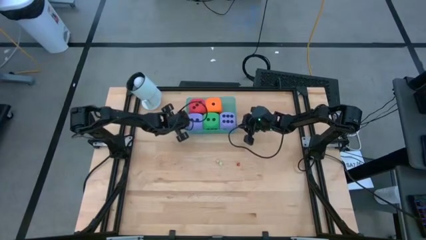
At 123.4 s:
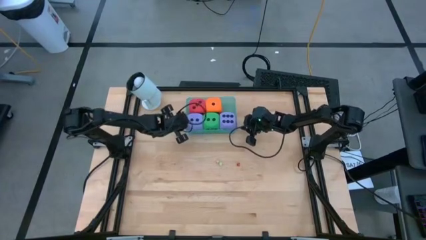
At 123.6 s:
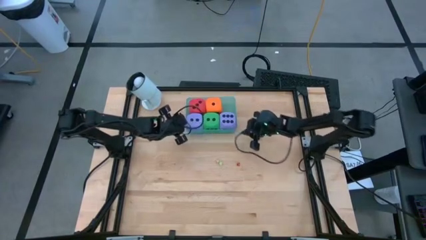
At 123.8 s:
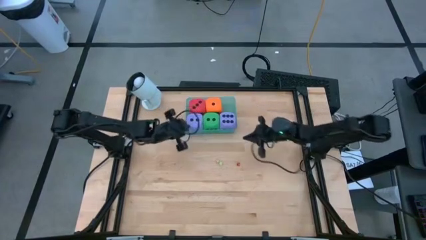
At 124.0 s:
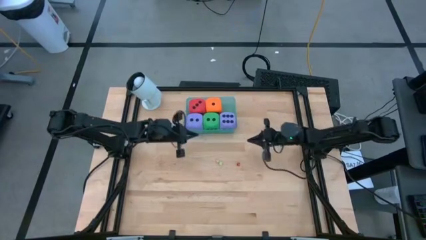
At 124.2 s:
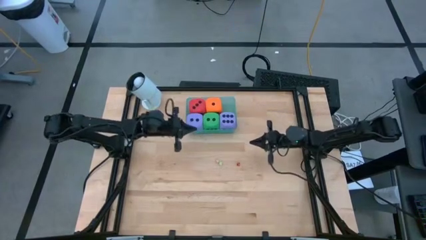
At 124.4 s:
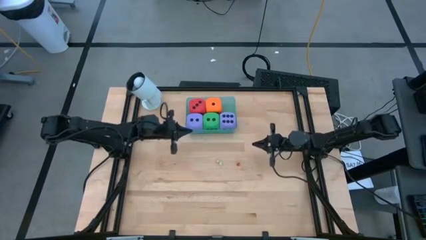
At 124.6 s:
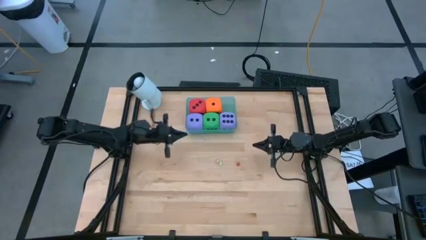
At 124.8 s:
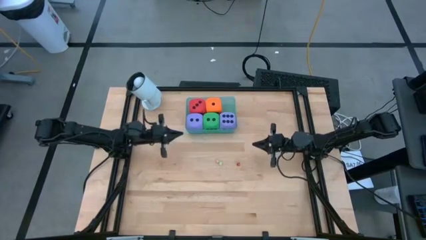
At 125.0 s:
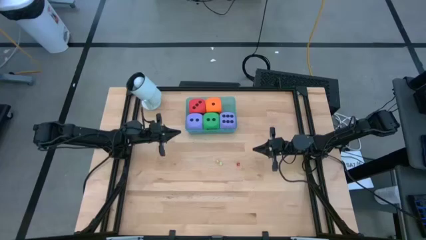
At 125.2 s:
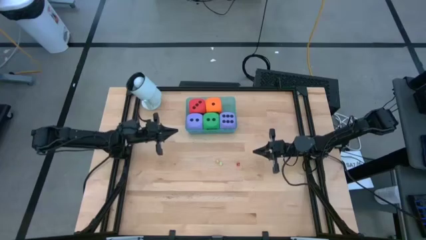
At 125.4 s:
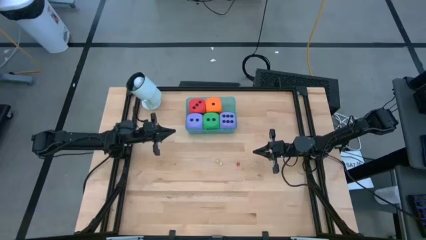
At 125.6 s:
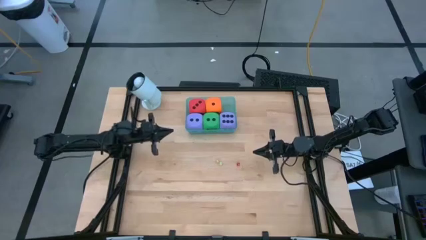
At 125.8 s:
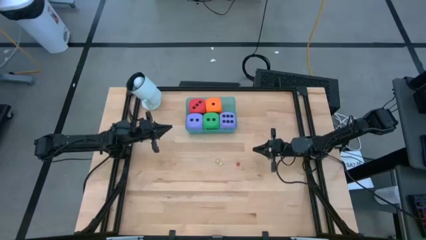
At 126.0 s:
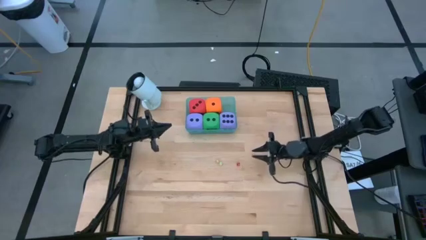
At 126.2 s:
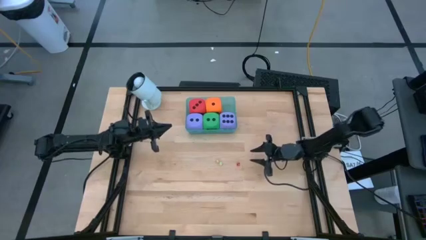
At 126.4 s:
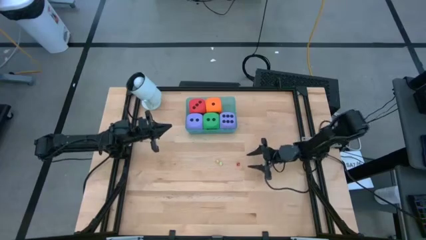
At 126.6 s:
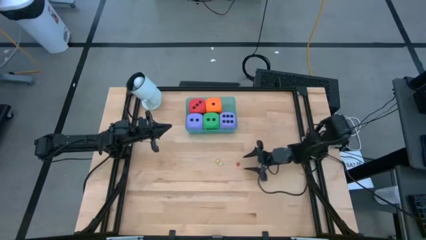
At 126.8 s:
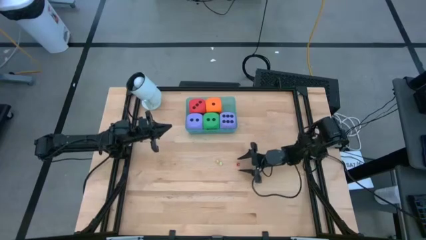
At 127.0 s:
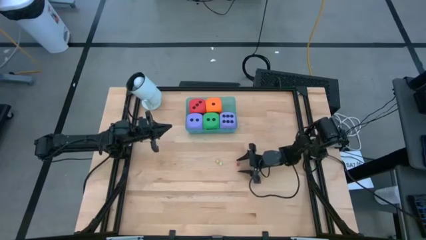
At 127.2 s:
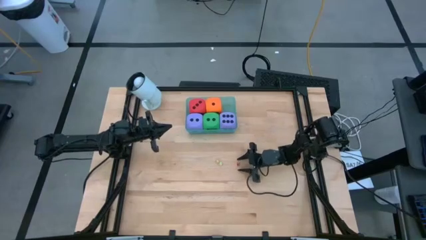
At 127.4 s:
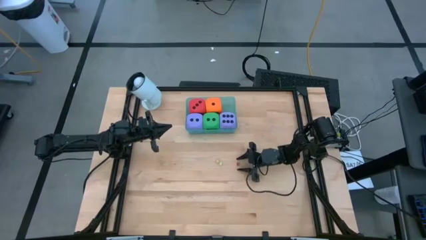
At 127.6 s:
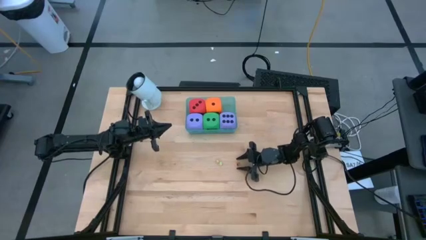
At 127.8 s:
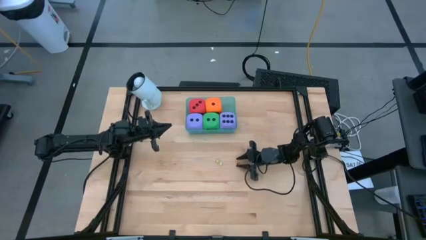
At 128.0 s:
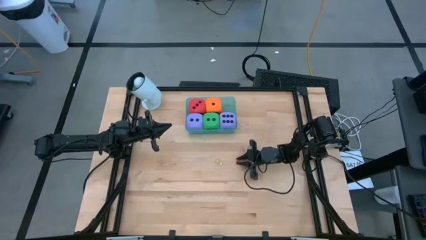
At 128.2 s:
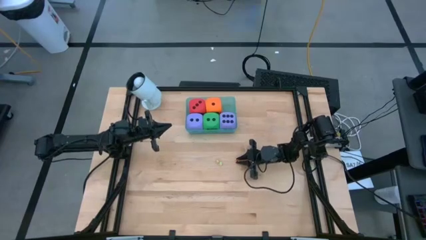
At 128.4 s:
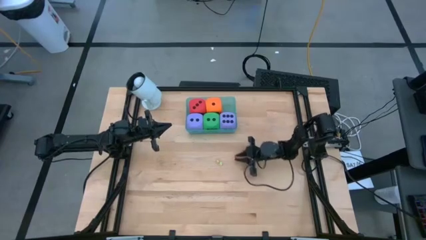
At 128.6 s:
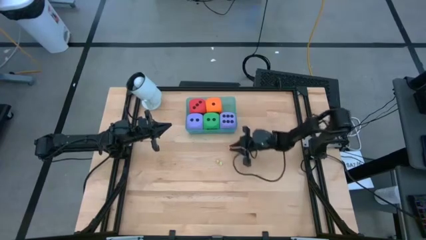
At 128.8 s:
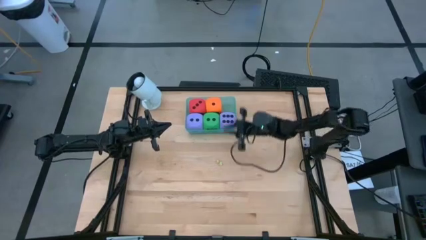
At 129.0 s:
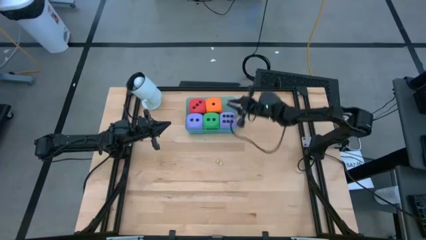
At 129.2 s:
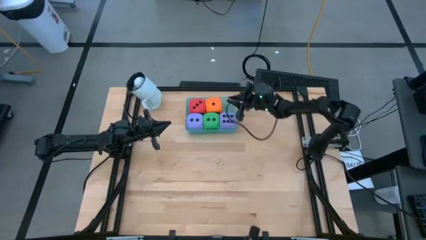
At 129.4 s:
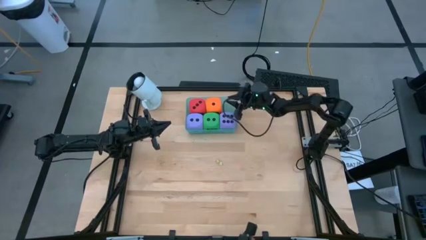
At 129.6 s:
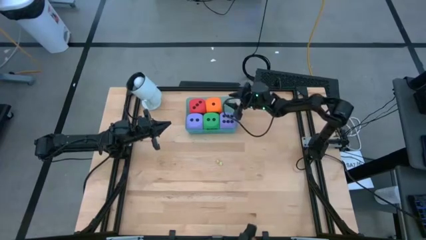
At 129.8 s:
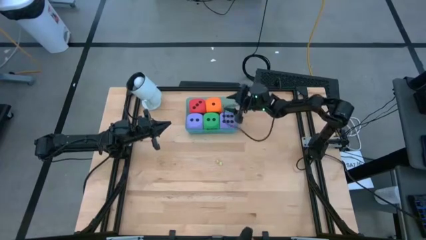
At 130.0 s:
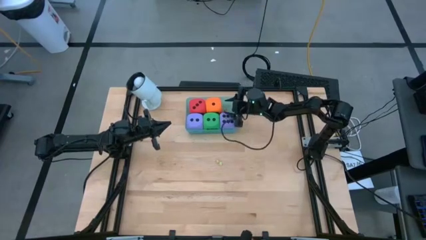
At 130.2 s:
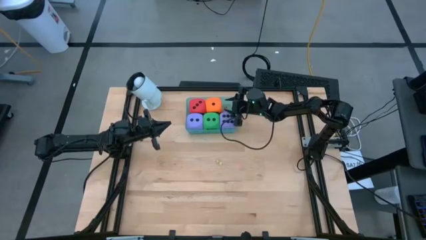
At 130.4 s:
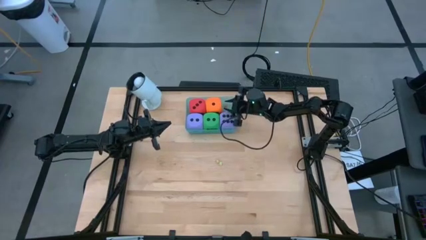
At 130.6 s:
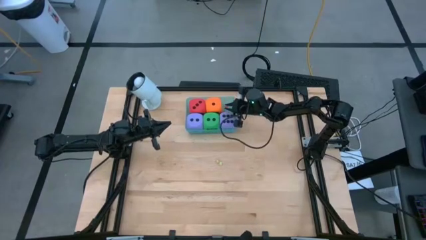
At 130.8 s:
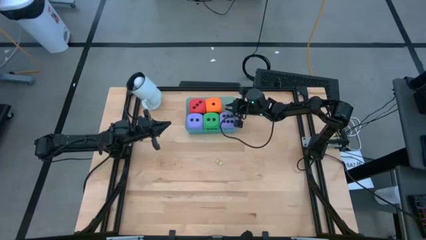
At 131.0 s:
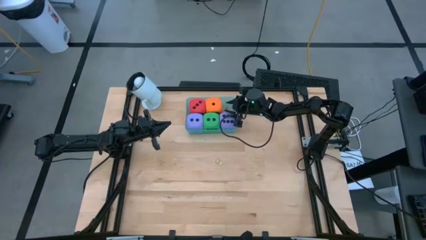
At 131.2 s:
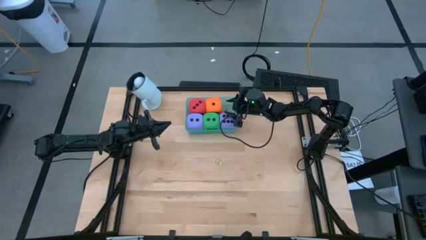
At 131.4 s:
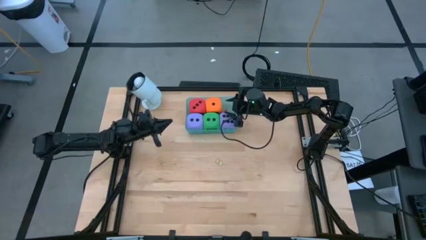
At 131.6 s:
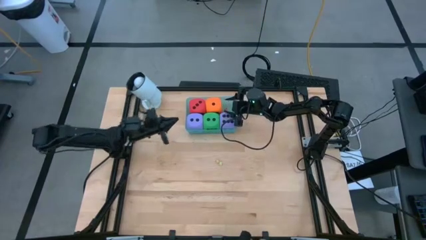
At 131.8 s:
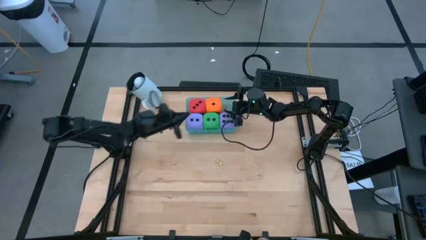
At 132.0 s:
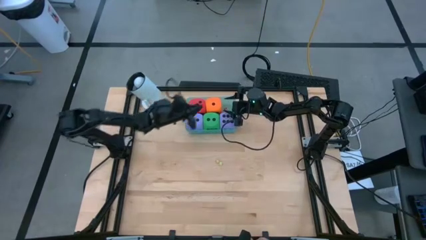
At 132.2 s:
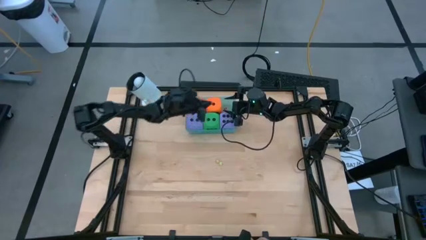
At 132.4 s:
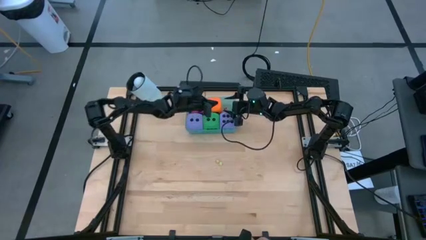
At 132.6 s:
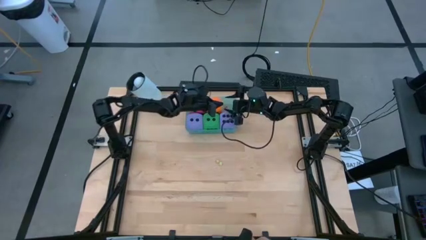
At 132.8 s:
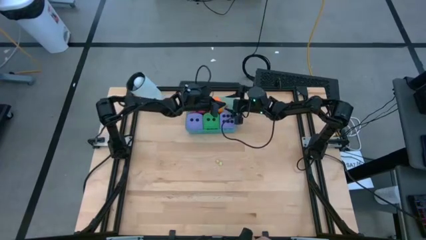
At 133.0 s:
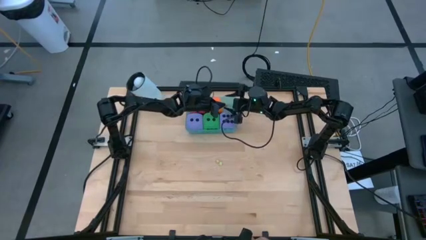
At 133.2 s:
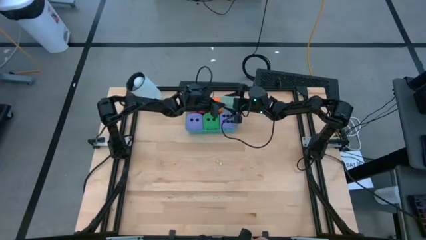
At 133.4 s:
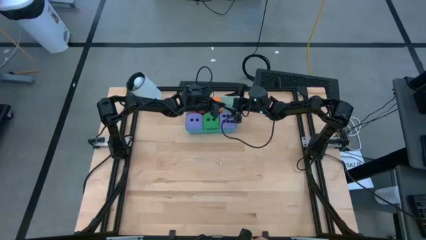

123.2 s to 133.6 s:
Task: Pick & Place Dice
Put the small red dice into the light blue bin

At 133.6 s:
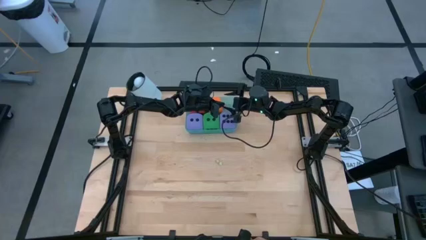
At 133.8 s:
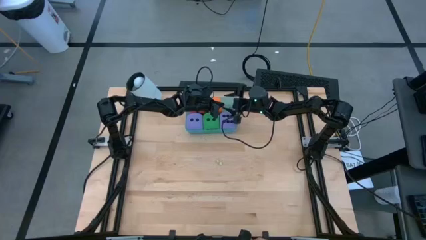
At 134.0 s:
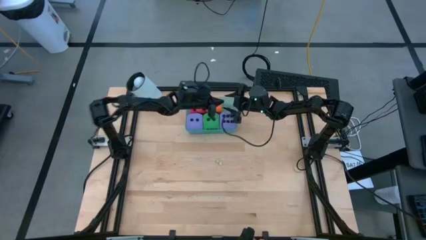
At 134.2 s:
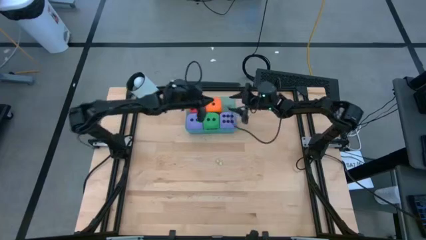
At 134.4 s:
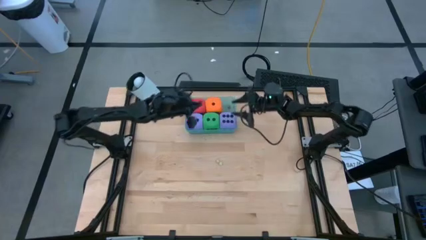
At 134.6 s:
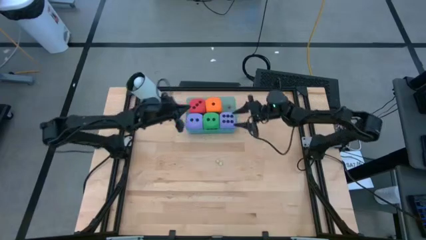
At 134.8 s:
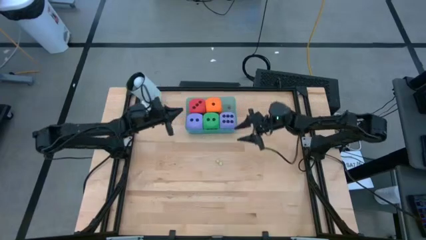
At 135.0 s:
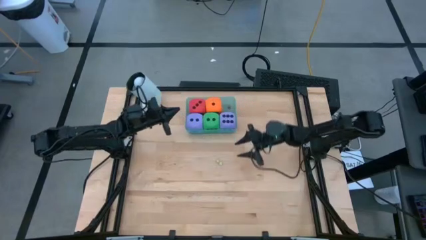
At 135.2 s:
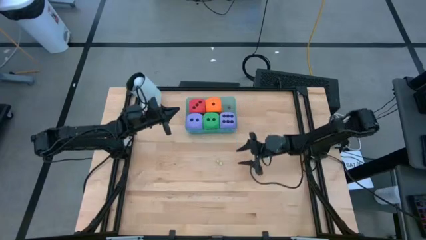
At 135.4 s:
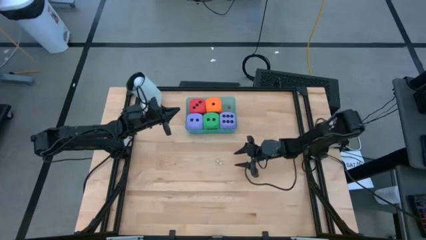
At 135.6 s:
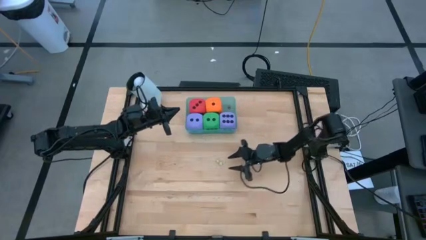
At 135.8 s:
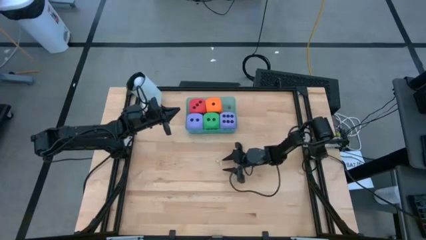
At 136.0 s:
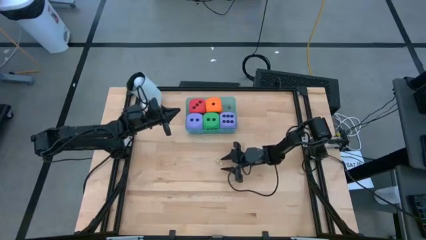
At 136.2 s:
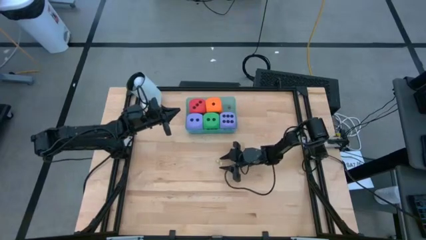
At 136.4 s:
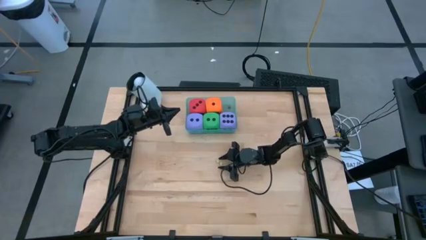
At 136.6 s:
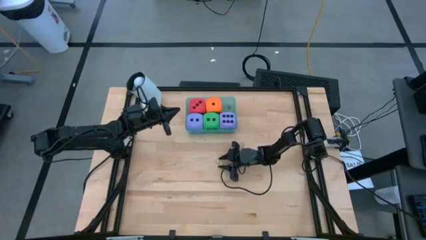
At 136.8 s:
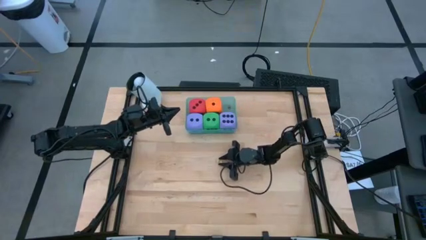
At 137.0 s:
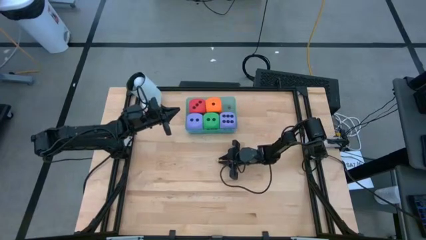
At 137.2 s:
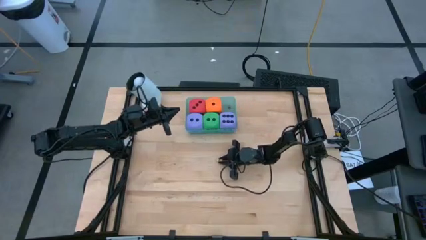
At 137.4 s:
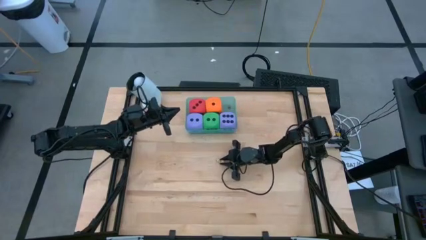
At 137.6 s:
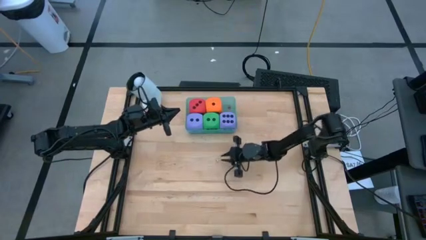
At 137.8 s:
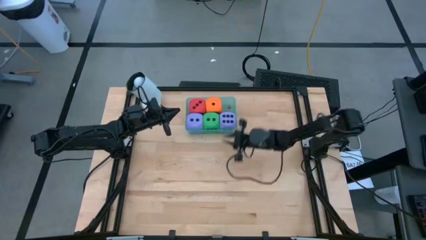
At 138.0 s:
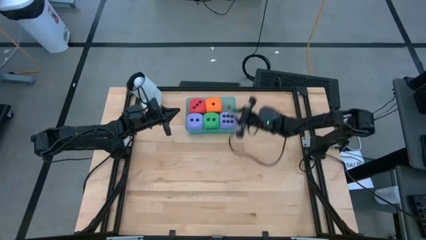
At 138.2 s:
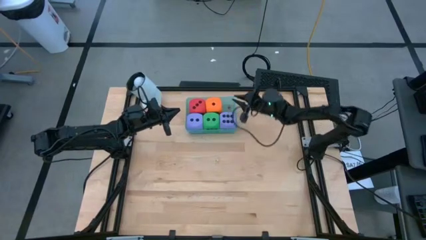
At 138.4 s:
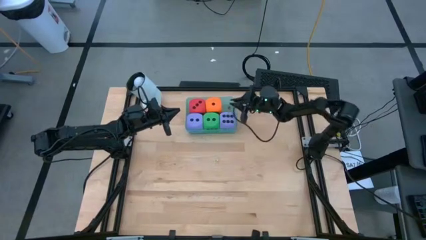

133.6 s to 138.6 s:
Put the small green dice into the light blue bin

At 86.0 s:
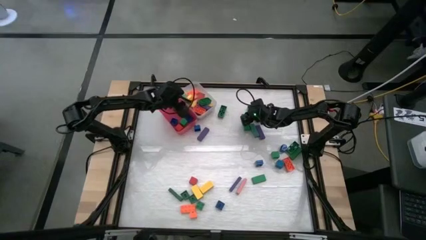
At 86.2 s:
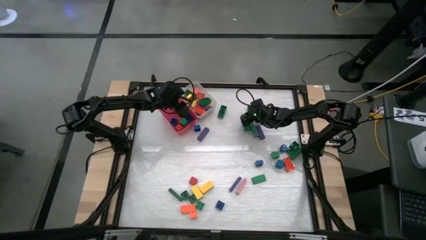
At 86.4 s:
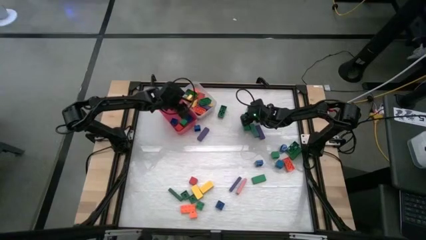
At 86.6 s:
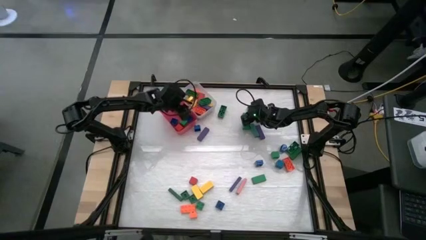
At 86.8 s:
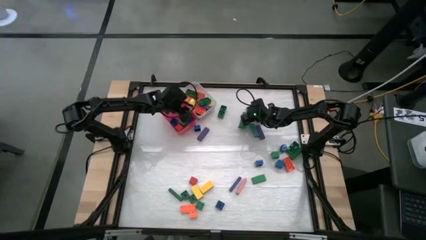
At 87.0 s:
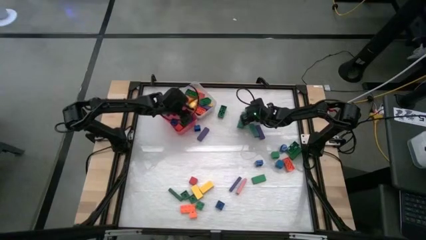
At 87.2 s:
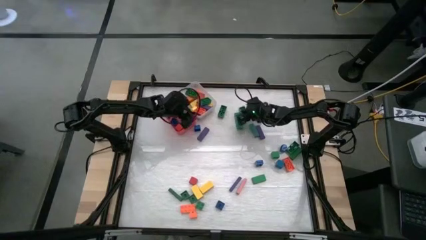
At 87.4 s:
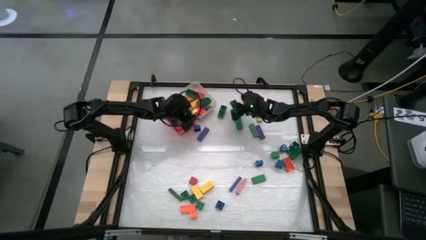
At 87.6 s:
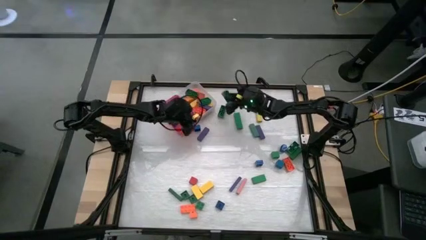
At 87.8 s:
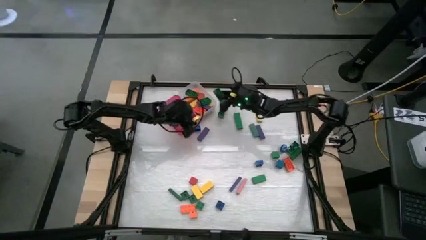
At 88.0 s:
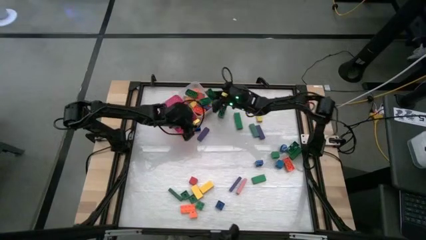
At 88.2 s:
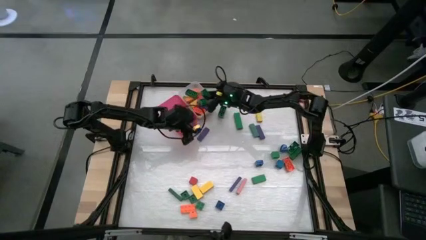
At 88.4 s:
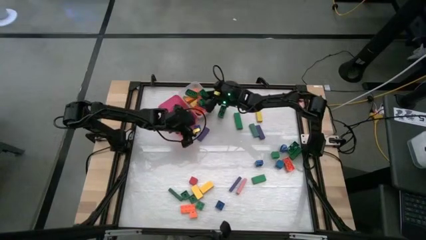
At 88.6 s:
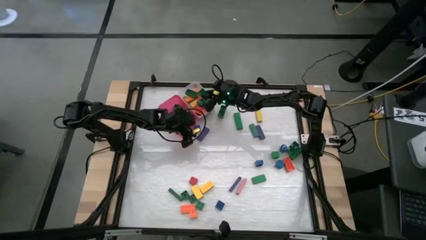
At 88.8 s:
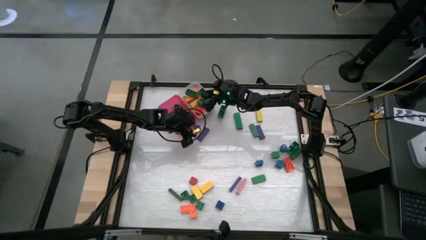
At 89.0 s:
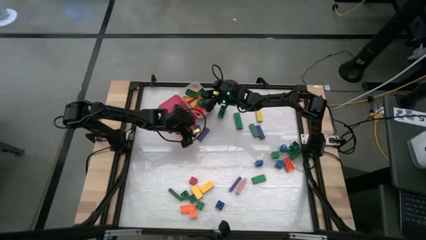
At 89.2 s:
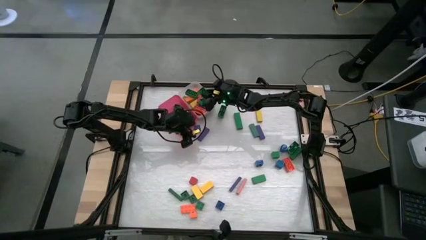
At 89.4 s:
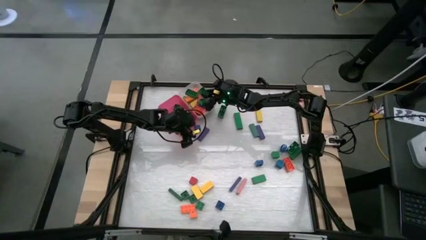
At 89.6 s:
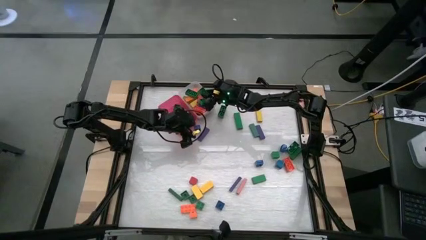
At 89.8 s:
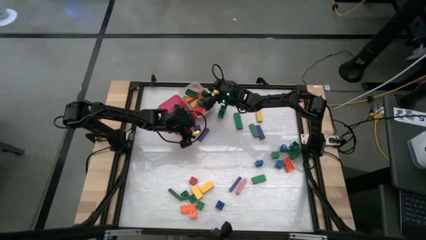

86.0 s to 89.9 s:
Task: Sort blocks by size
Put the big green game piece into the white bin
